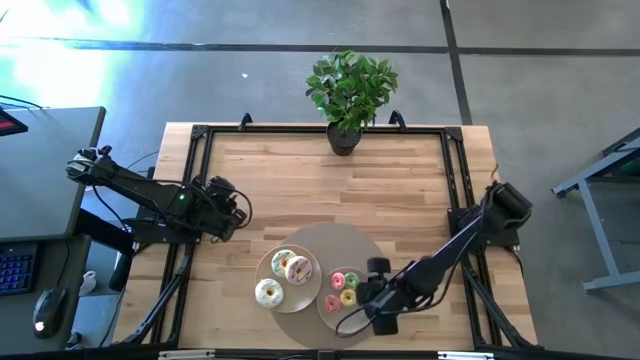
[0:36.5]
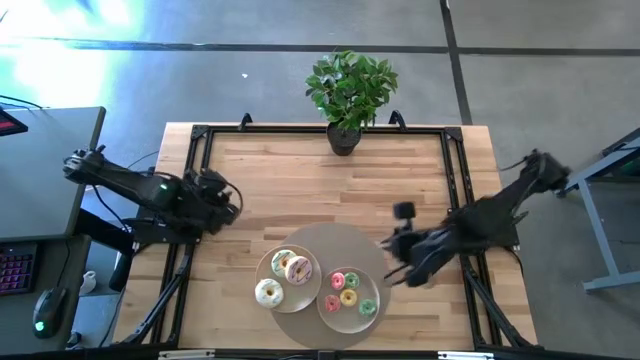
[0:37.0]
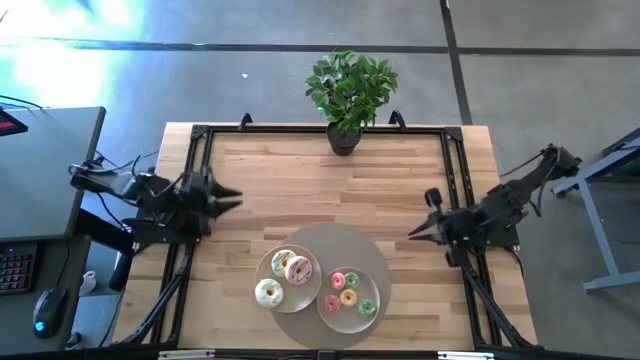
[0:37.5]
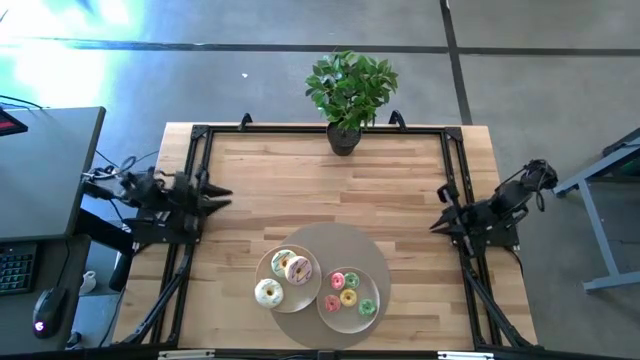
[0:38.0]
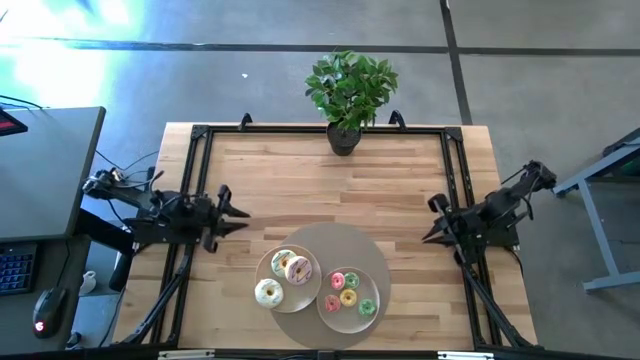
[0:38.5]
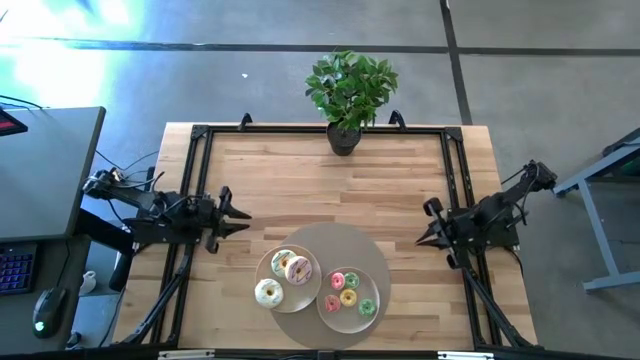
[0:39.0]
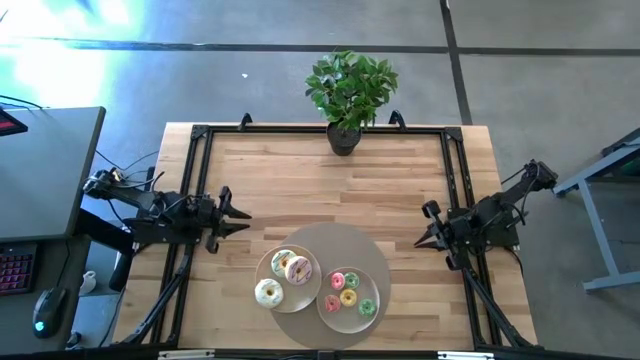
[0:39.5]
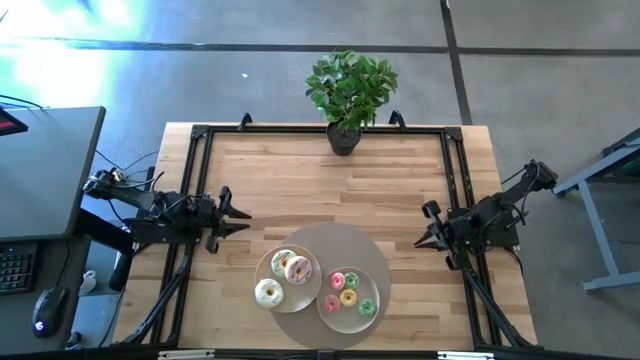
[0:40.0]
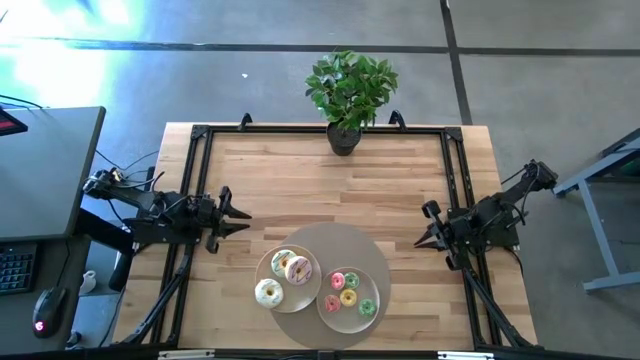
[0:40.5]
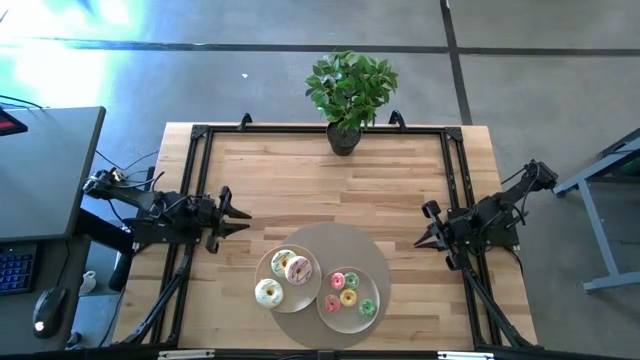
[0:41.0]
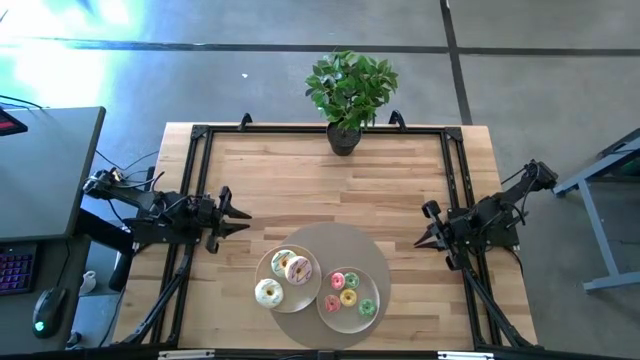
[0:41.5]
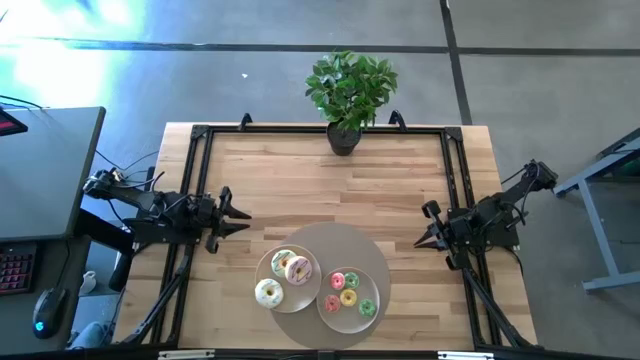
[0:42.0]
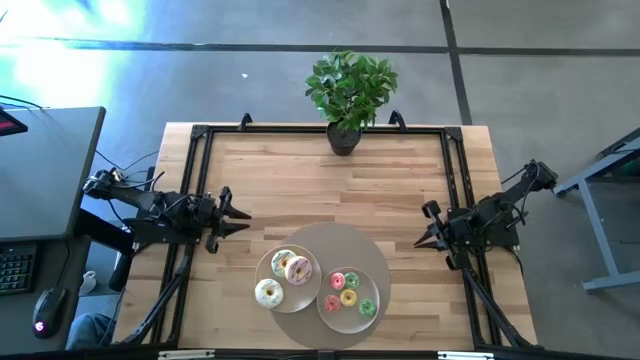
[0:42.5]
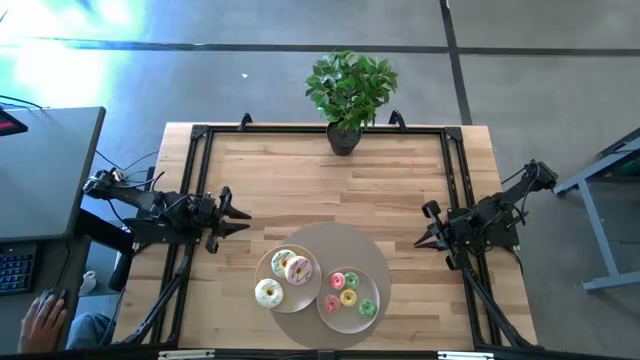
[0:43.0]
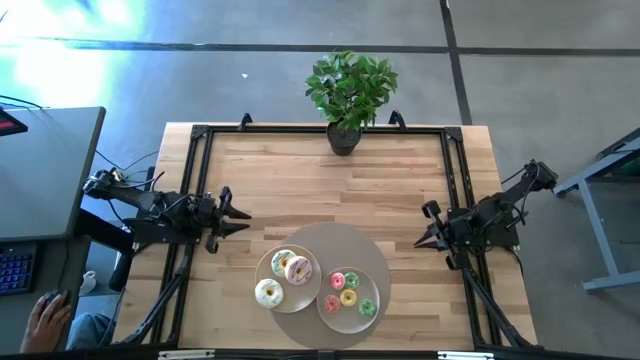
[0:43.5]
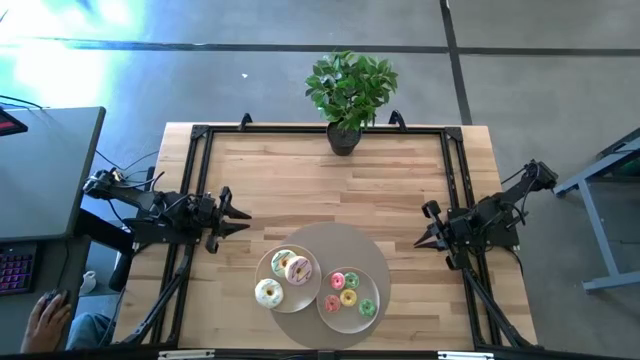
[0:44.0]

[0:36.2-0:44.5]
Task: Pick & Place donuts
Return to home position

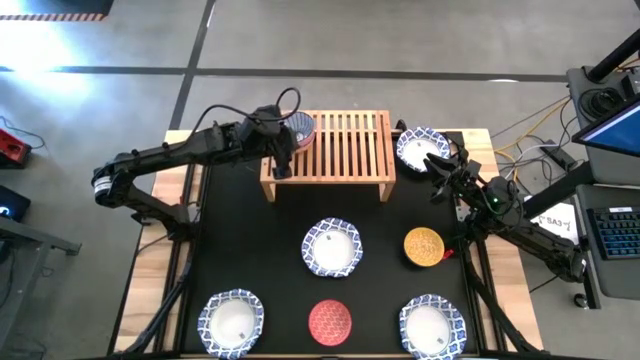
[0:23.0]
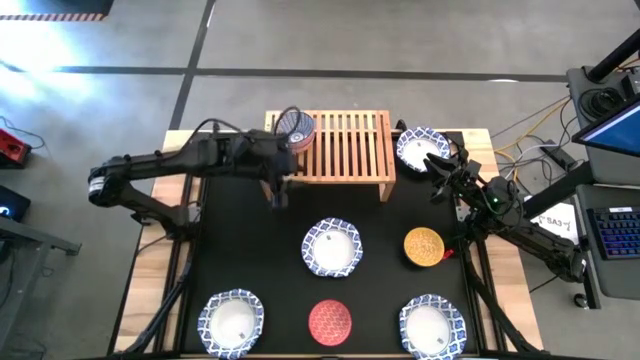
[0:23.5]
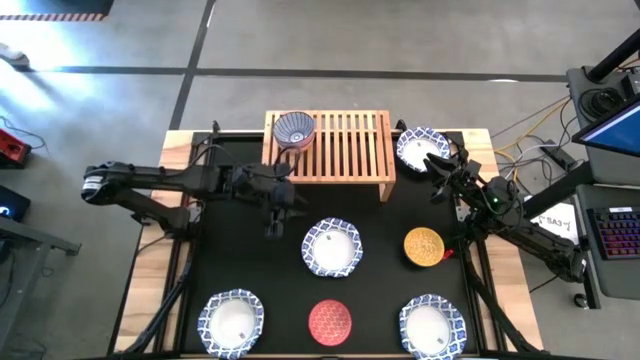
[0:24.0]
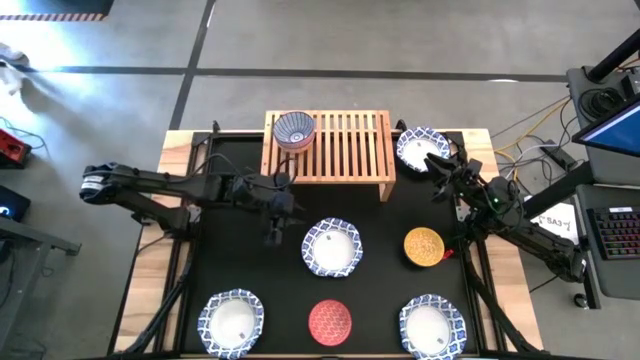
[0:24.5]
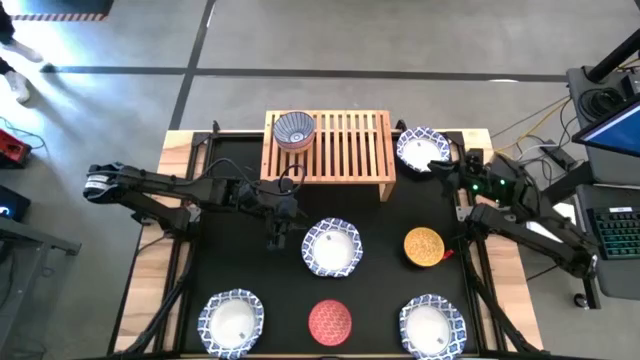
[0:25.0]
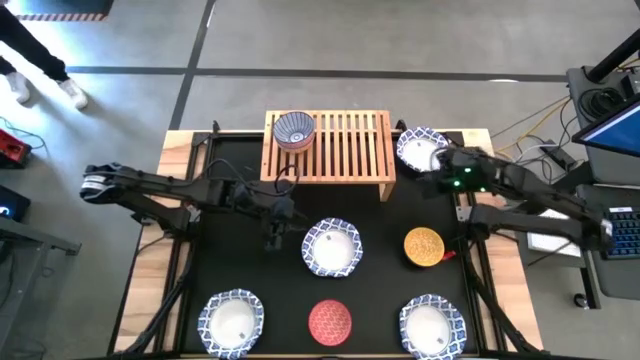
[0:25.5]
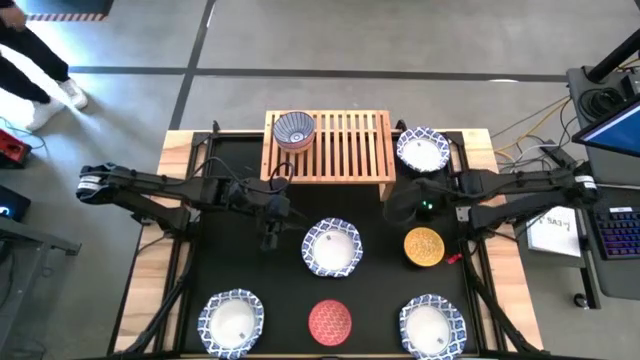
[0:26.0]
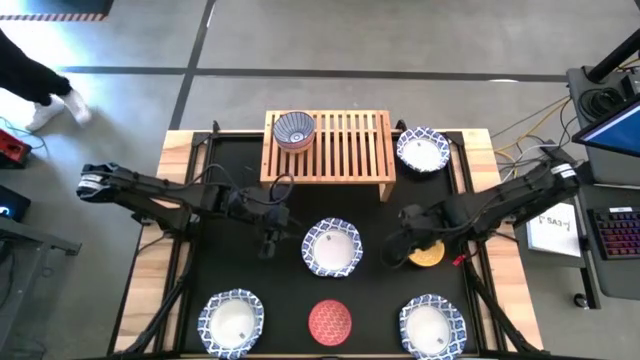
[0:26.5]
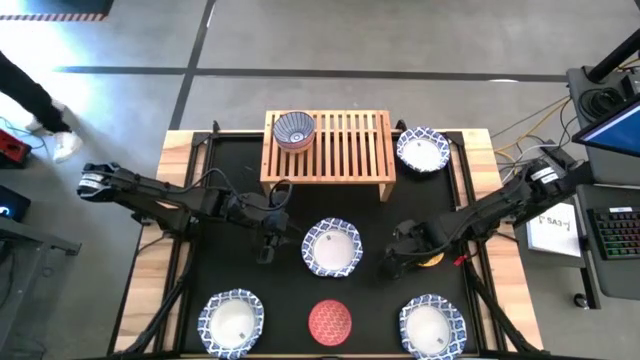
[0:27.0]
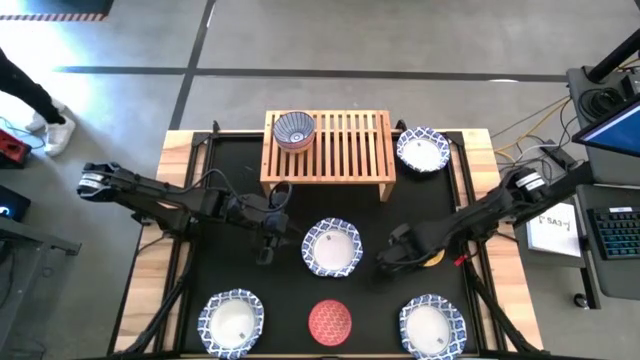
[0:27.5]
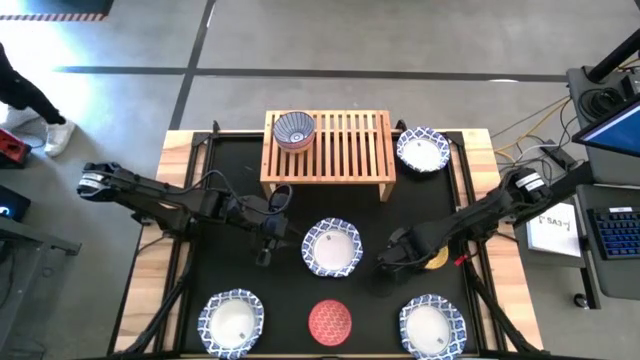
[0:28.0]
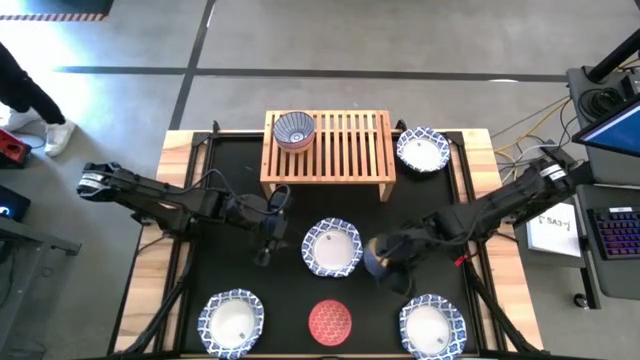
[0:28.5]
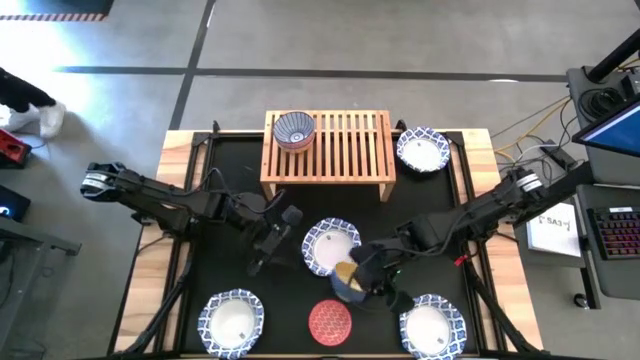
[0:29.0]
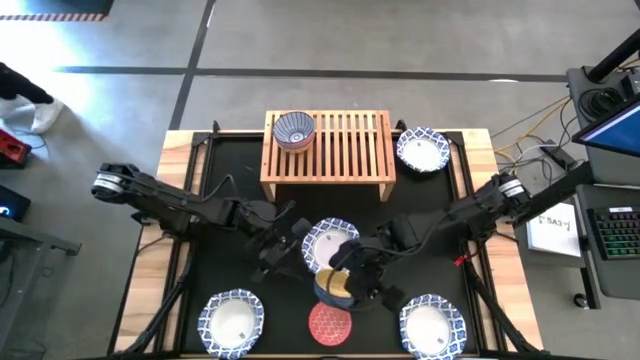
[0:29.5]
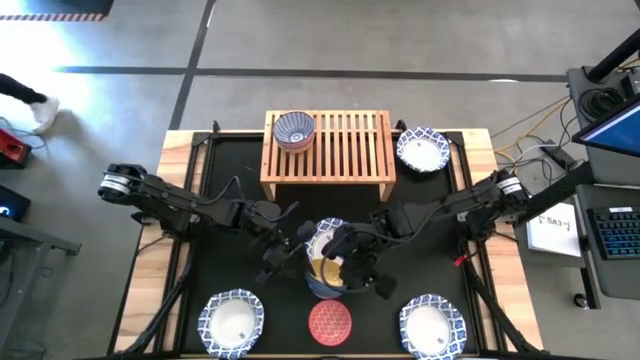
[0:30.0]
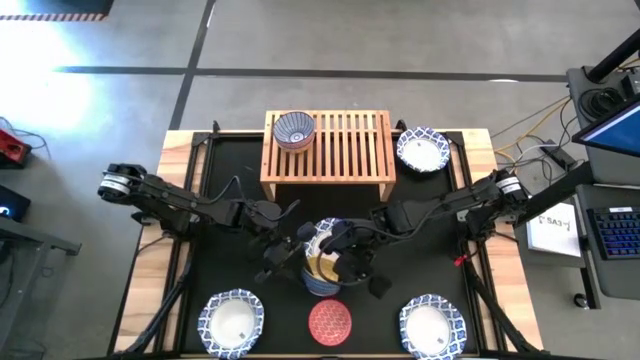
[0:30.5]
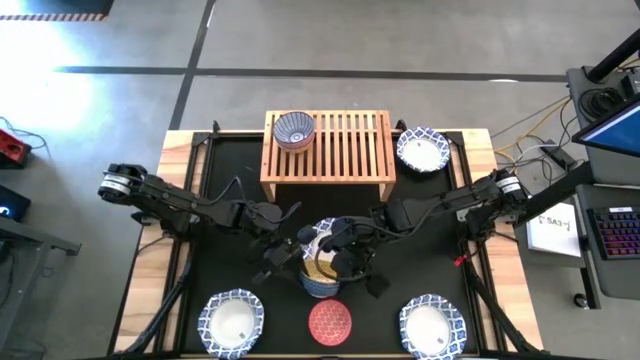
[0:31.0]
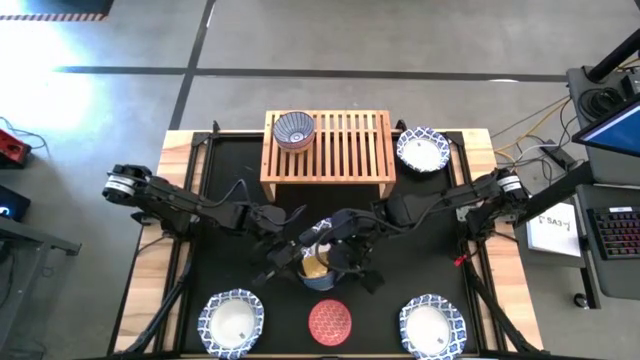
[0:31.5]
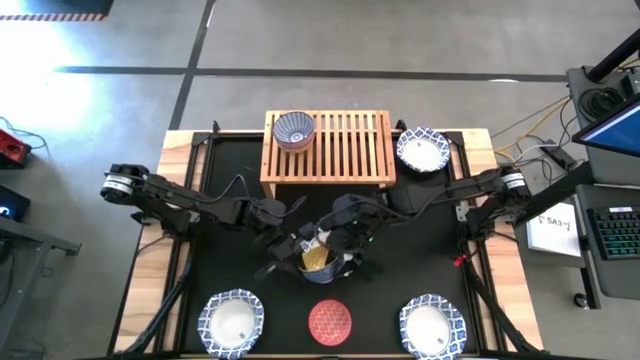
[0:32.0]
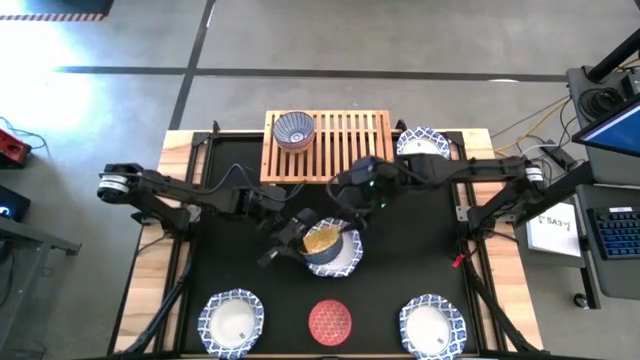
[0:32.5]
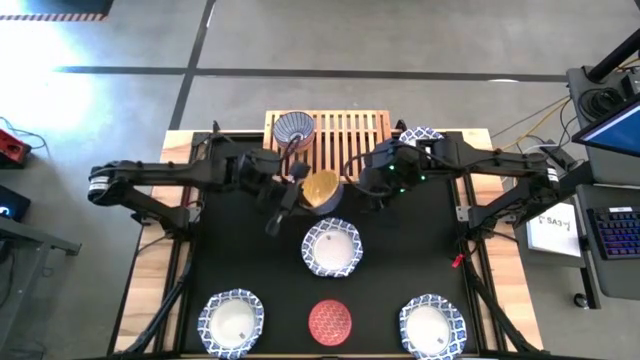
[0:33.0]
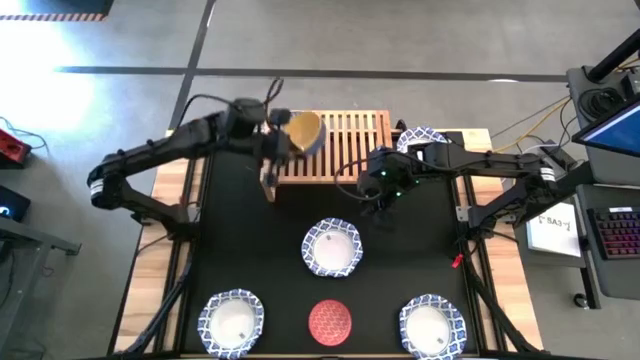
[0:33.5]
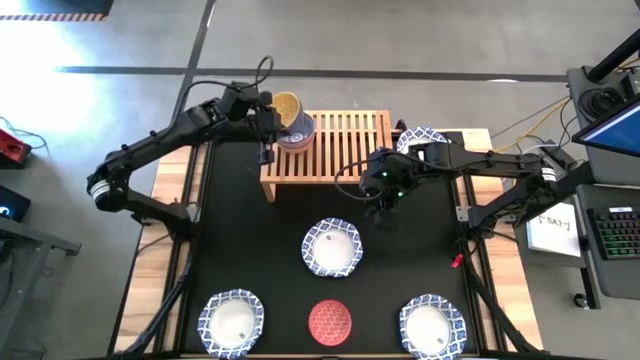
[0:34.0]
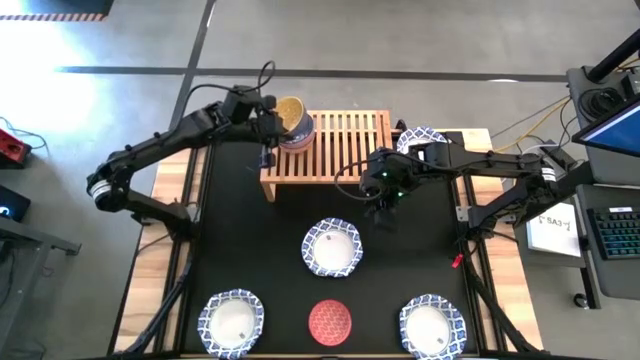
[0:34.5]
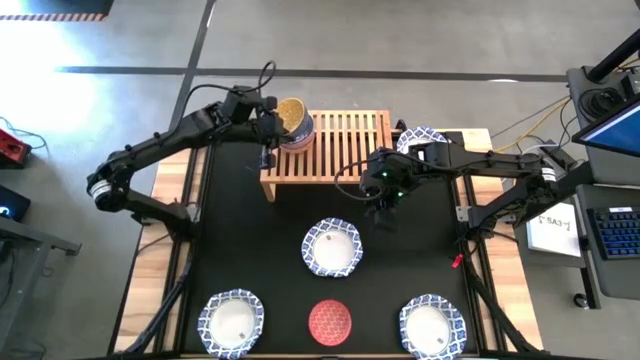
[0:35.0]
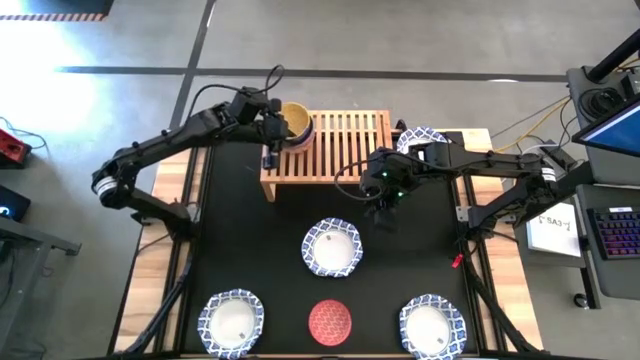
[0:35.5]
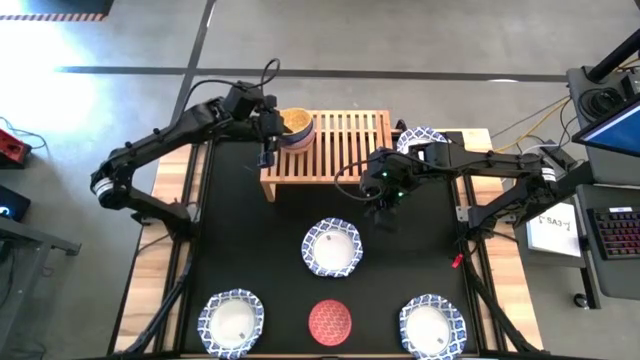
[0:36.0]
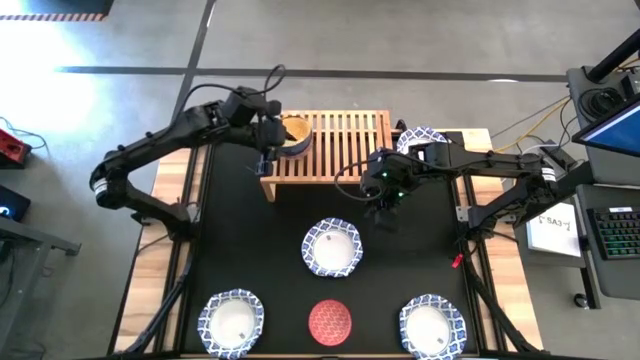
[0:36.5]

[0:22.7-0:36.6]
Task: Place and stack bowls onto a shelf
Stack the yellow bowl on top of the blue patterned bowl on the shelf
